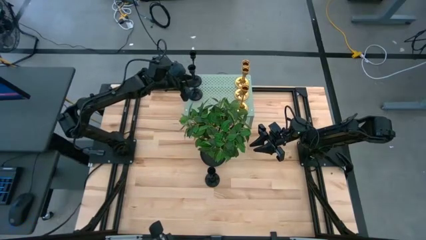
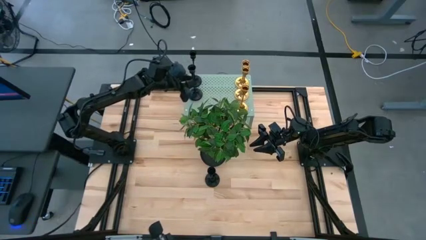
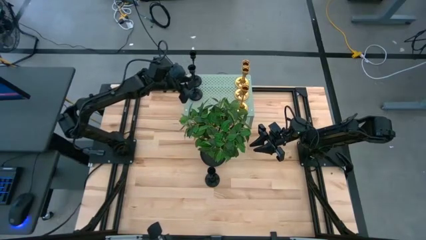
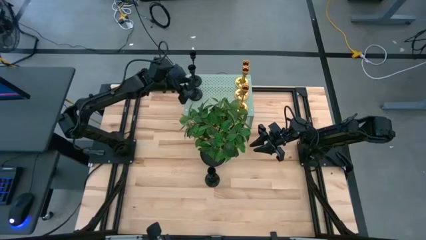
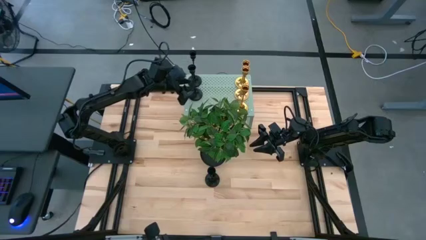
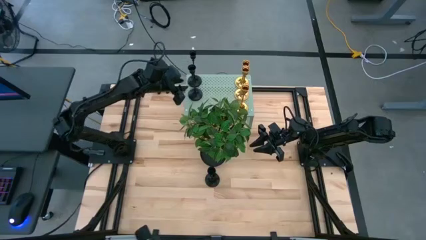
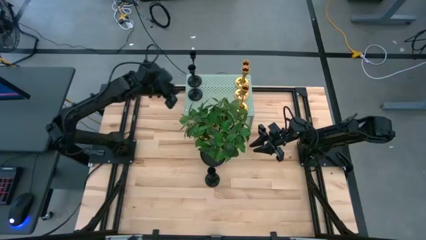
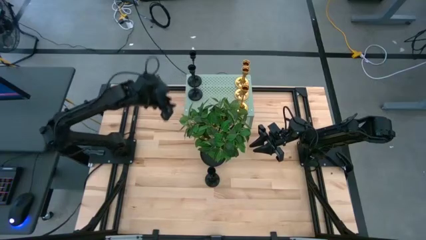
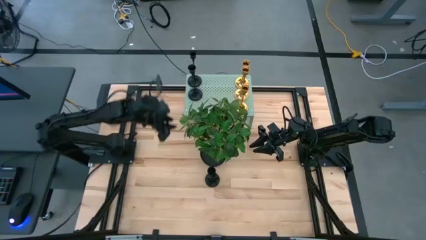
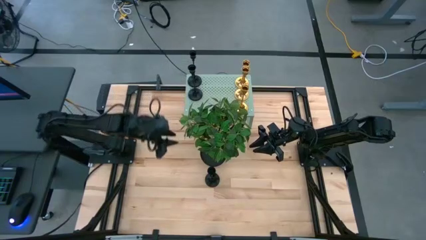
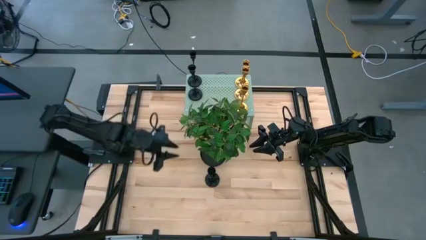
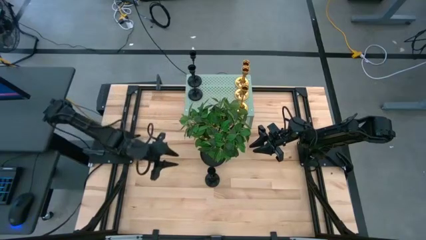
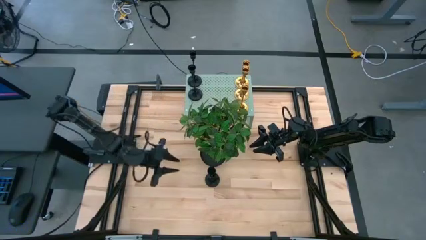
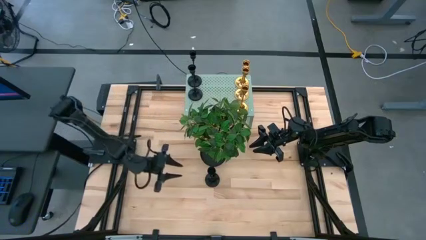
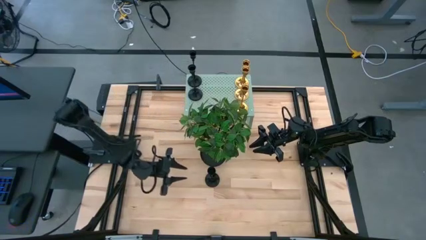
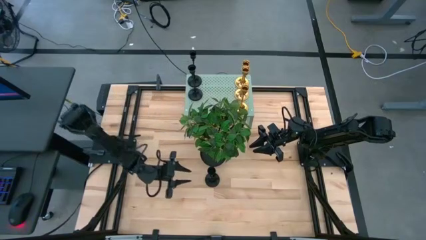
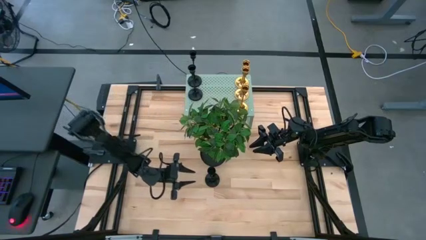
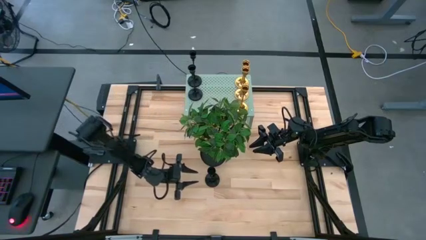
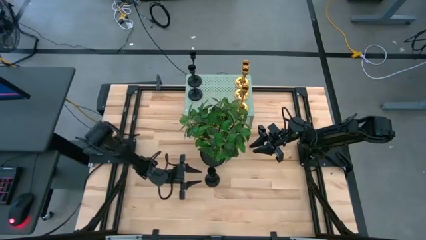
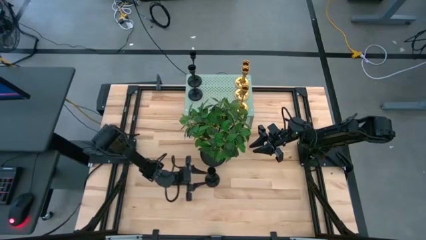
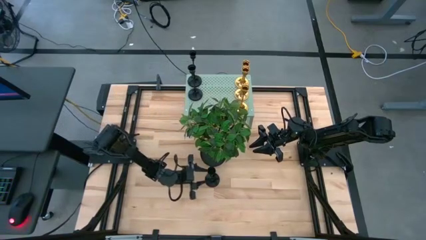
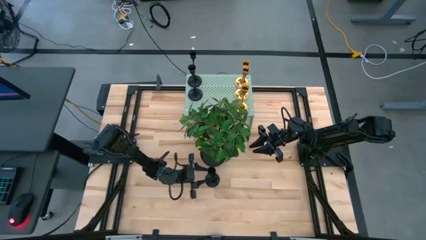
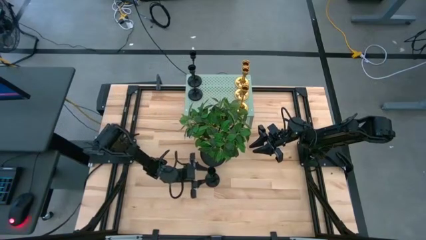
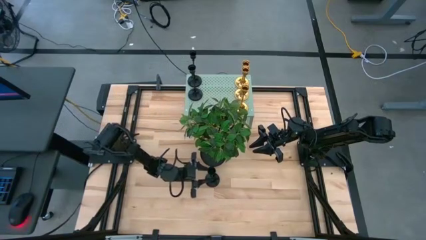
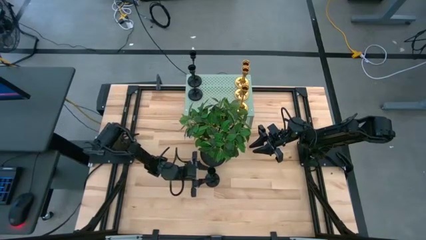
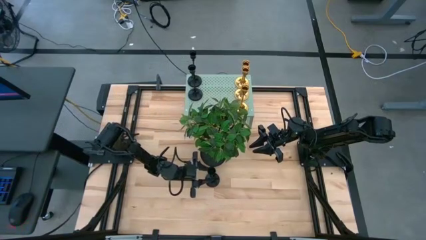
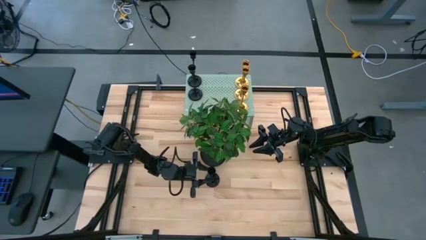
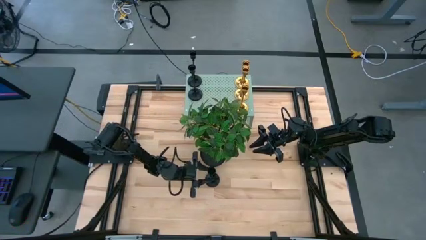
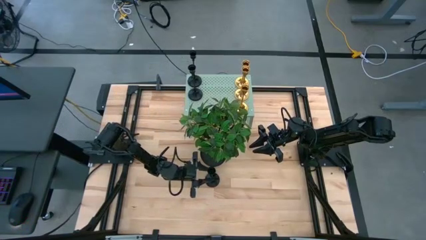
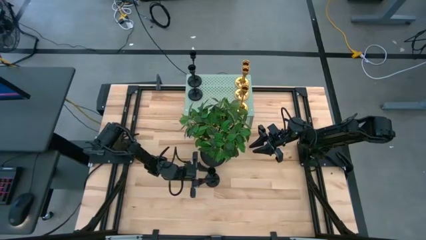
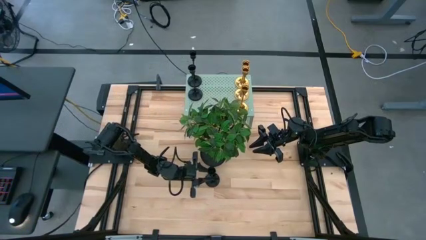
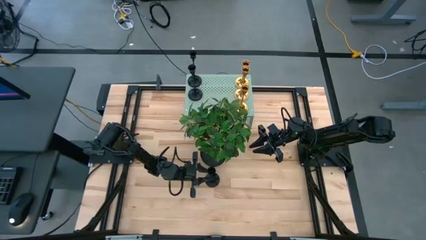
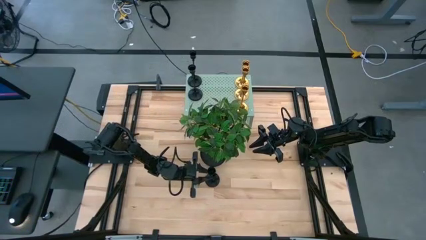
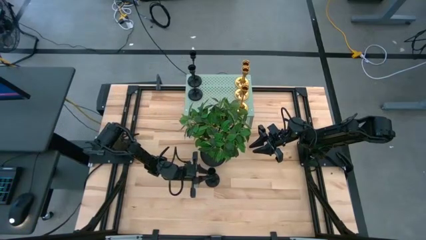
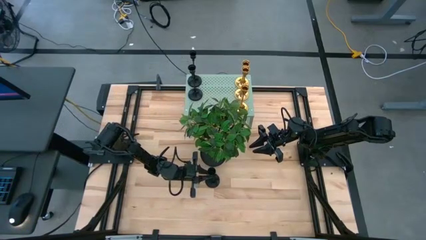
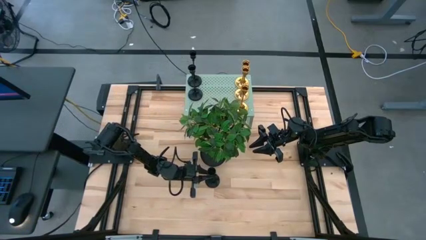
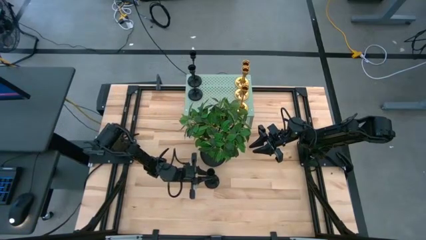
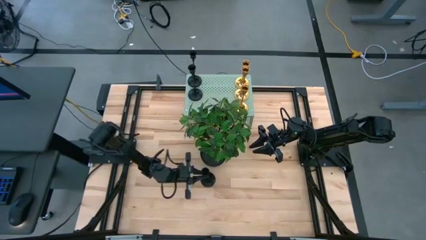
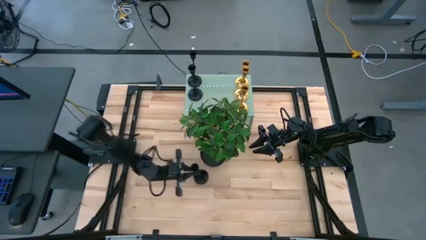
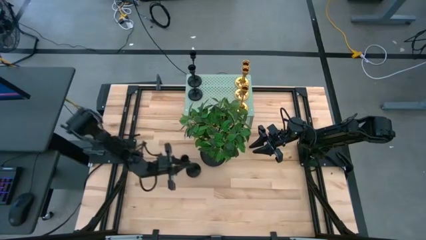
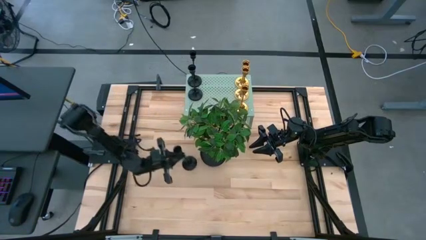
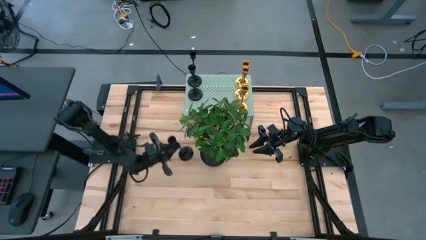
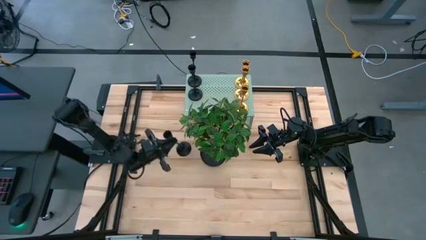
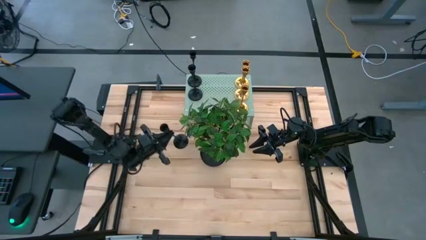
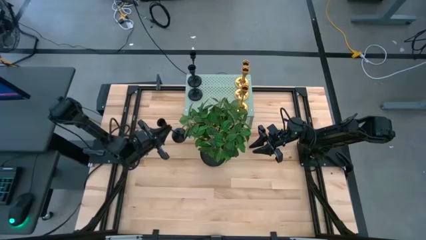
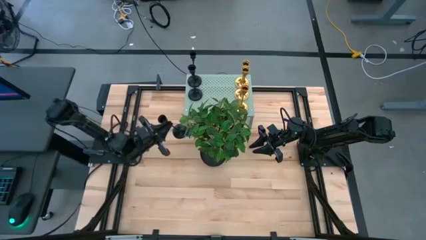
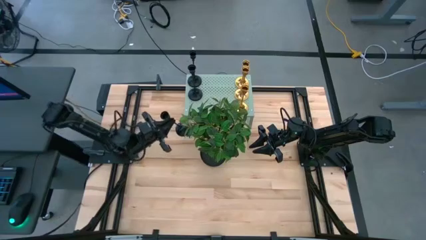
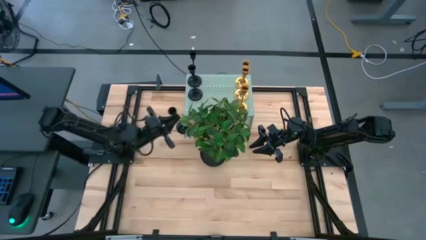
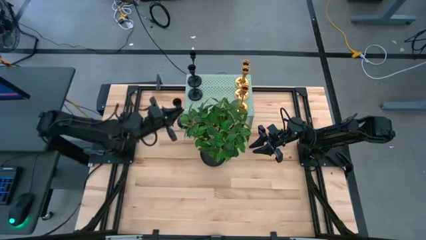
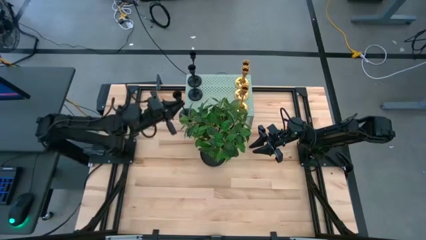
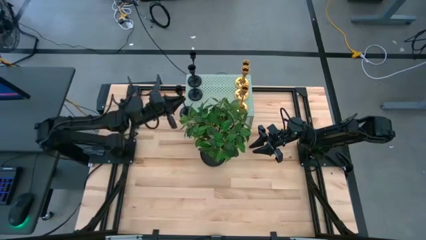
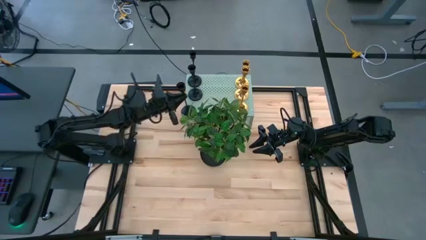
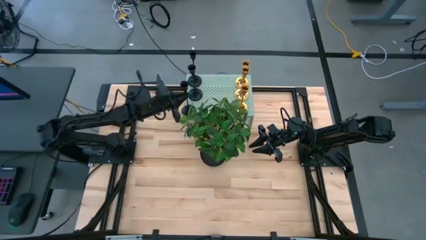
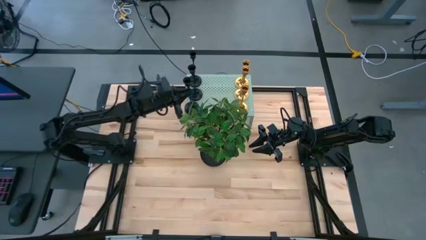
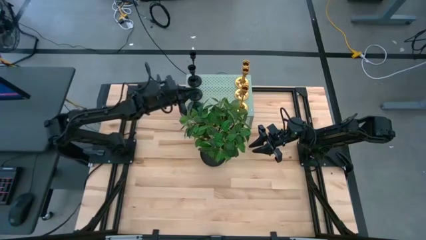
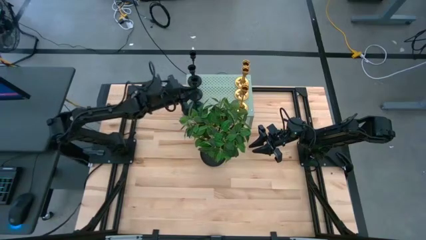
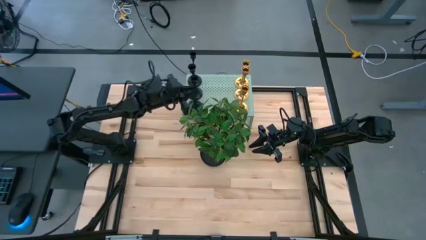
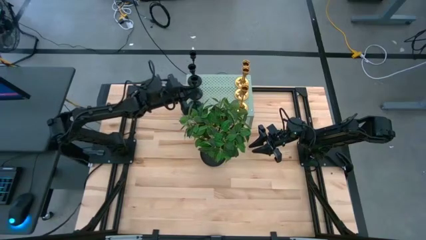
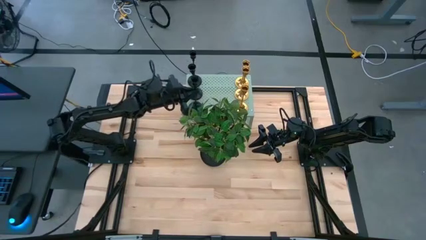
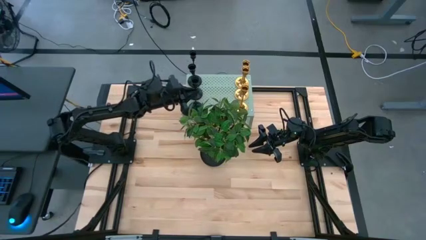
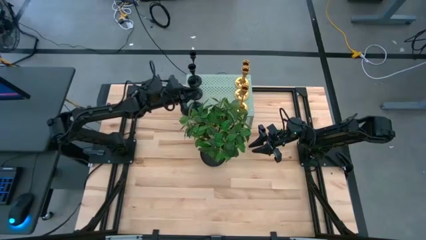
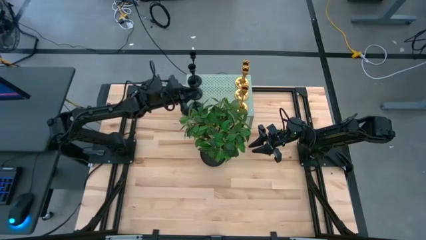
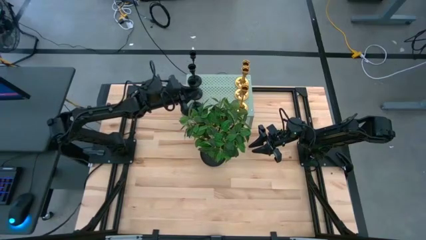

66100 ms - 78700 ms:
Task: Pick & Place candle stick holders
Put the black candle holder on the shelf aligned with the other black candle holders

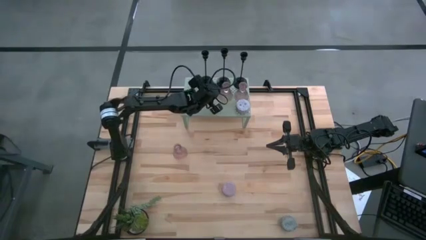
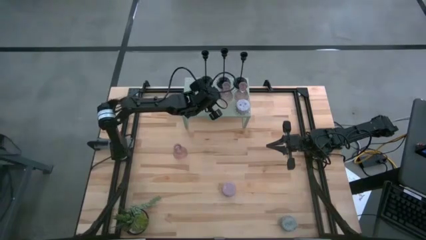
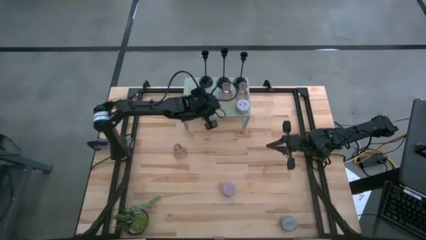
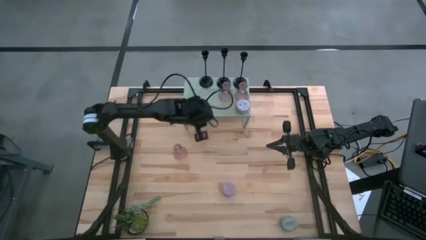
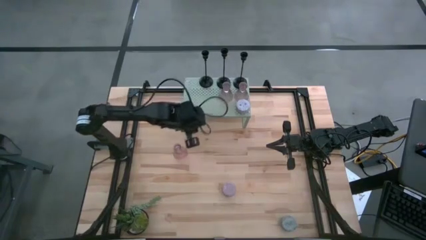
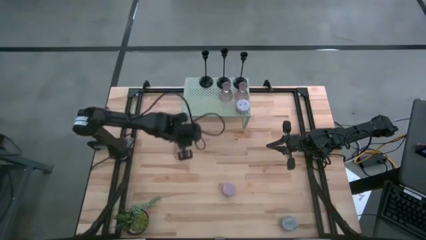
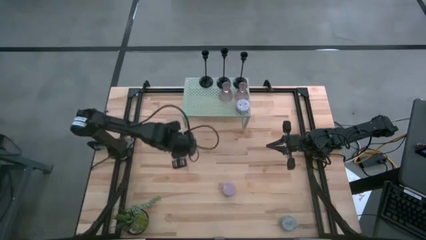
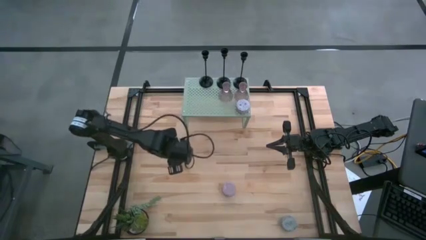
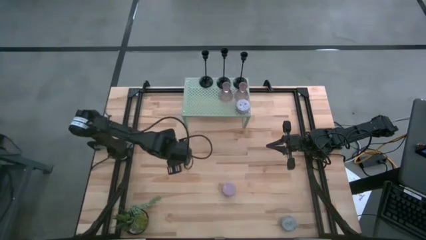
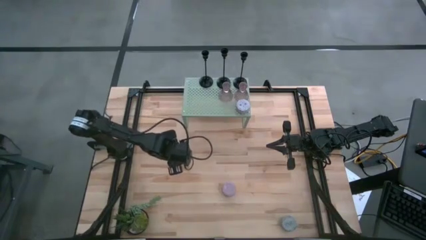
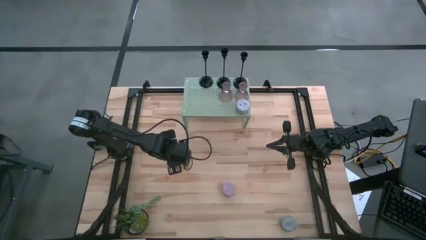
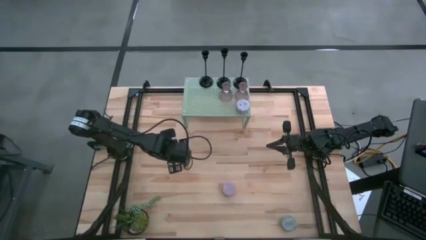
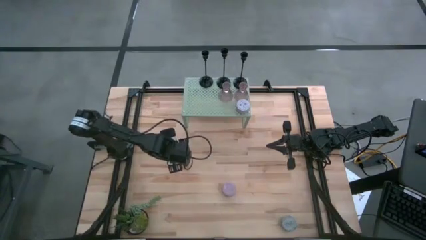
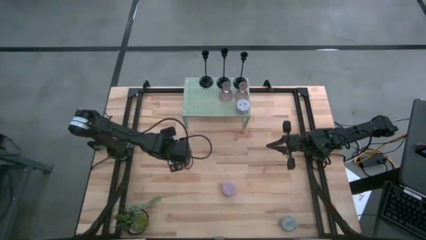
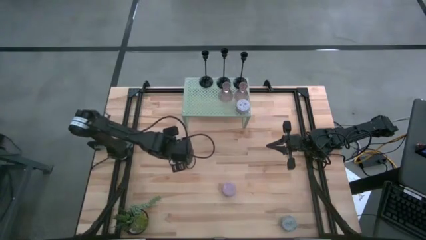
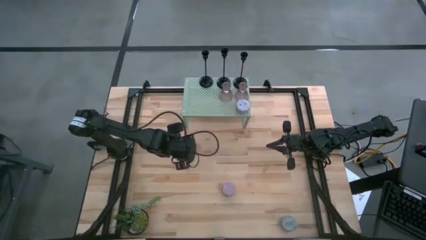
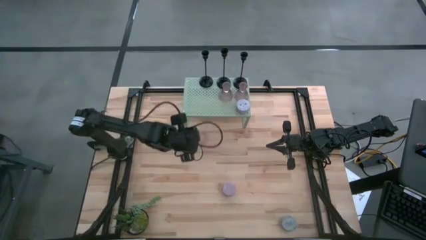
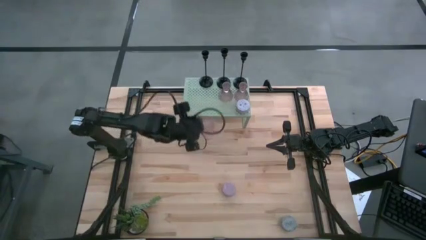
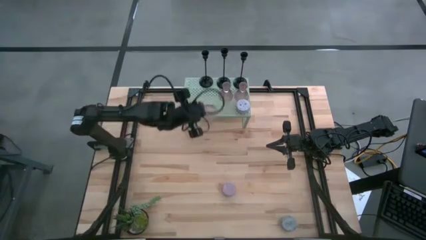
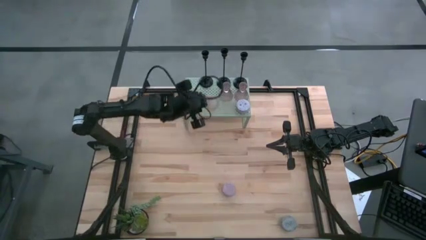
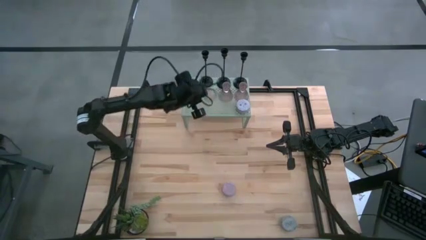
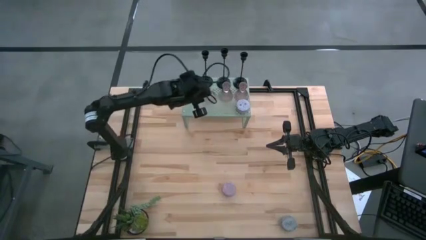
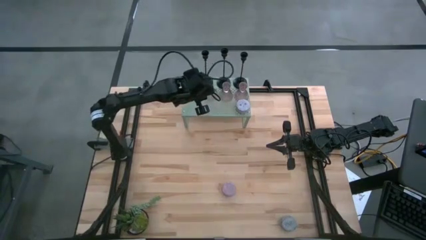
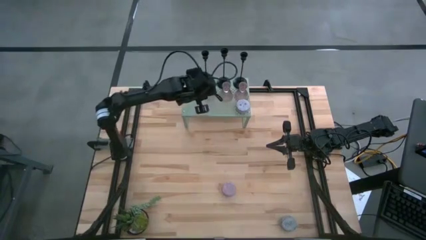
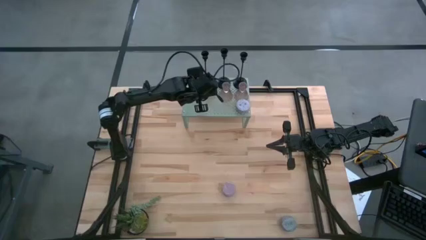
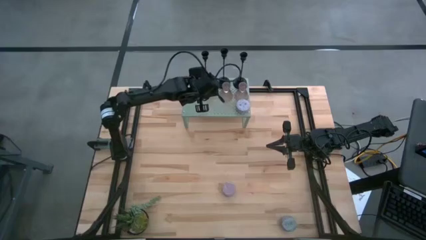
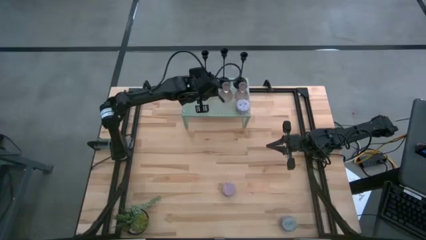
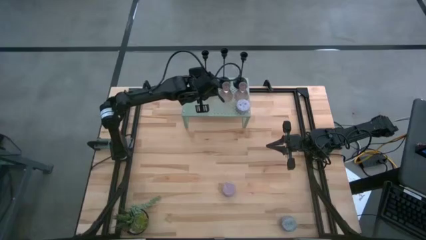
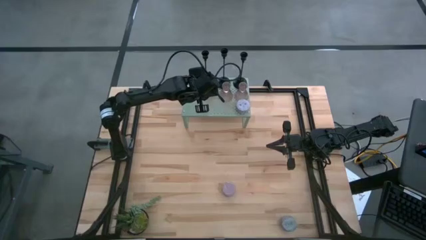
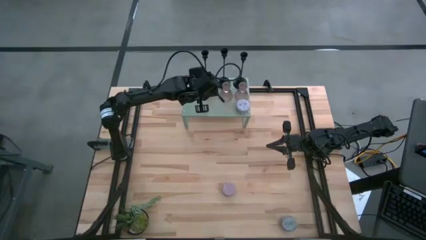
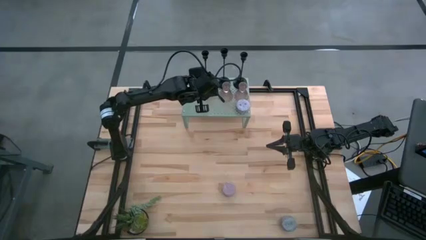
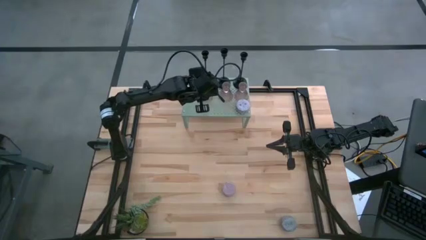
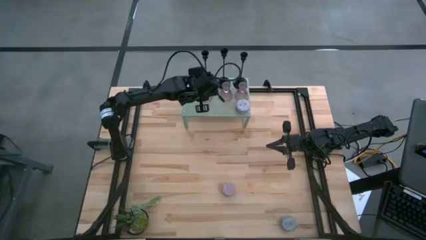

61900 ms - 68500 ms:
Task: Pick & Place candle stick holders
Put the pink glass candle holder on the shelf
